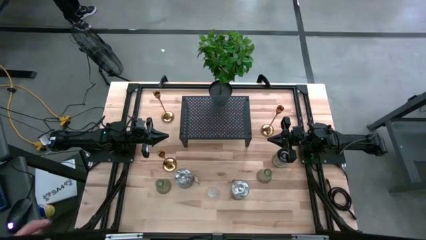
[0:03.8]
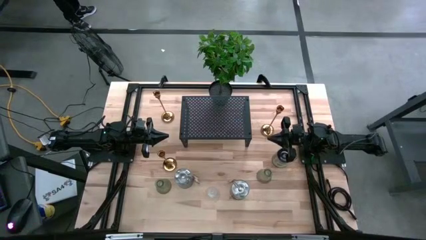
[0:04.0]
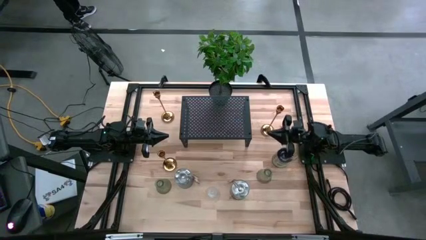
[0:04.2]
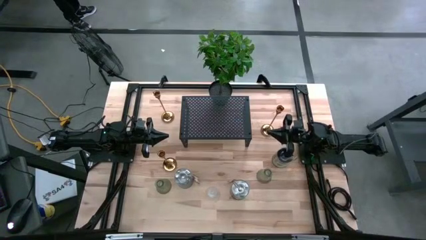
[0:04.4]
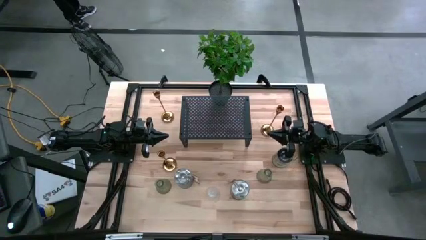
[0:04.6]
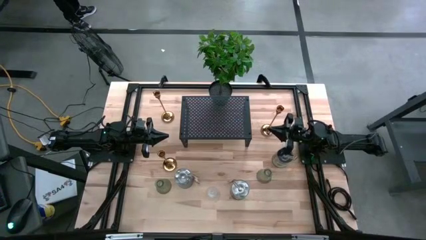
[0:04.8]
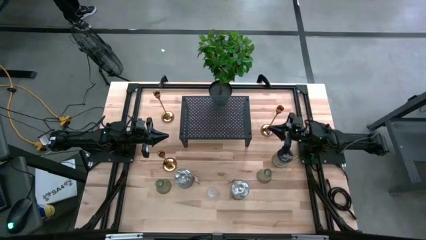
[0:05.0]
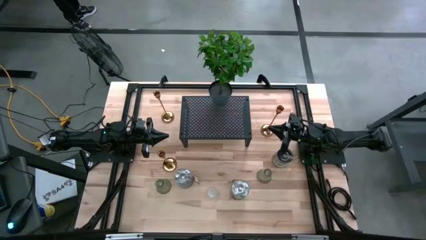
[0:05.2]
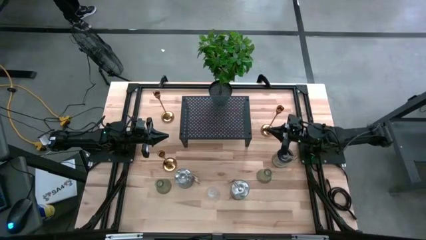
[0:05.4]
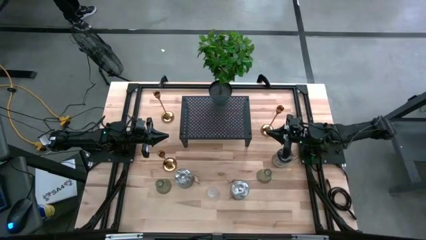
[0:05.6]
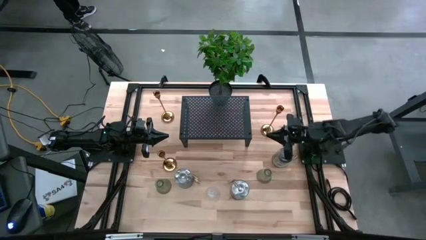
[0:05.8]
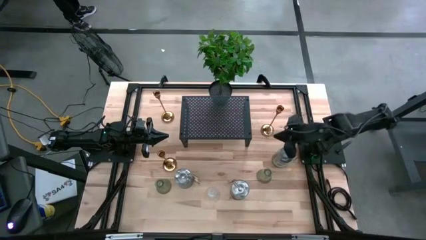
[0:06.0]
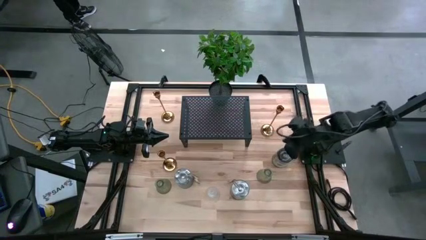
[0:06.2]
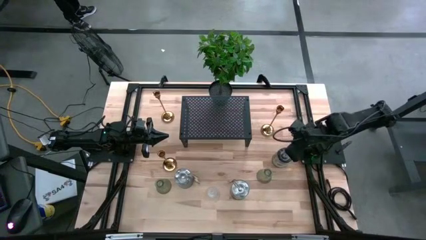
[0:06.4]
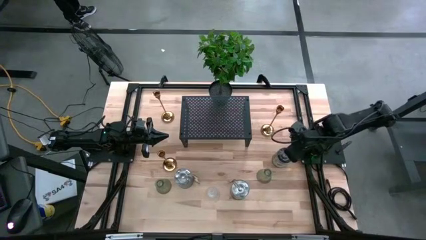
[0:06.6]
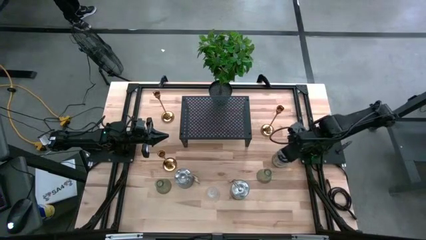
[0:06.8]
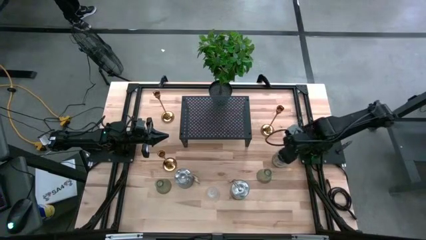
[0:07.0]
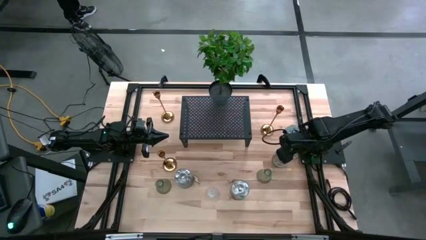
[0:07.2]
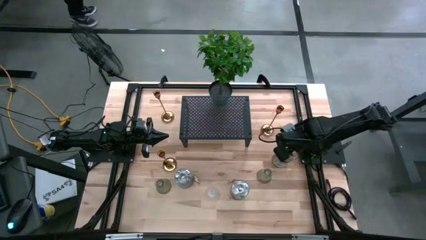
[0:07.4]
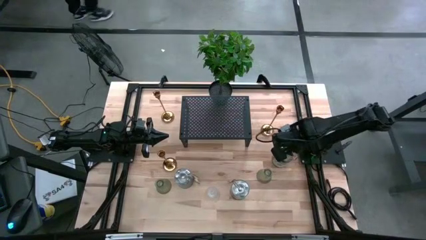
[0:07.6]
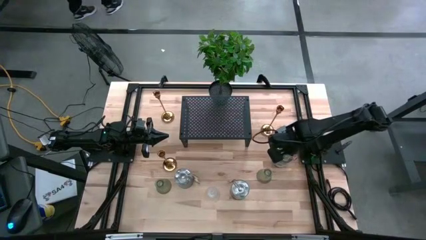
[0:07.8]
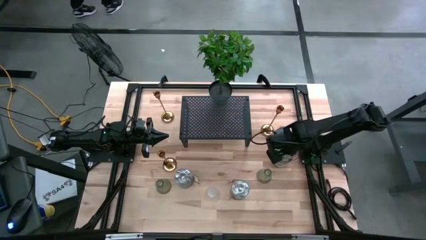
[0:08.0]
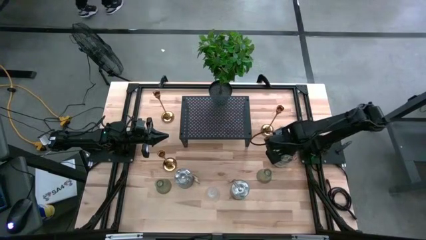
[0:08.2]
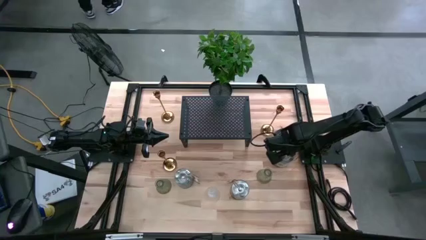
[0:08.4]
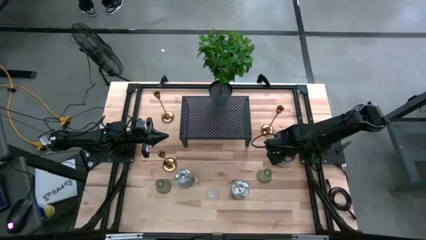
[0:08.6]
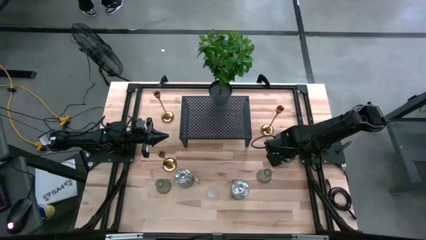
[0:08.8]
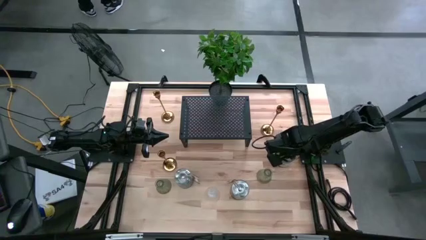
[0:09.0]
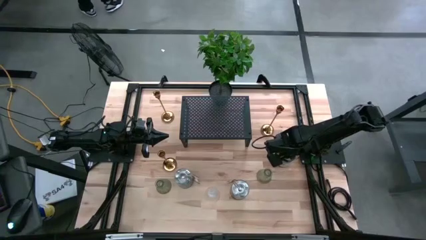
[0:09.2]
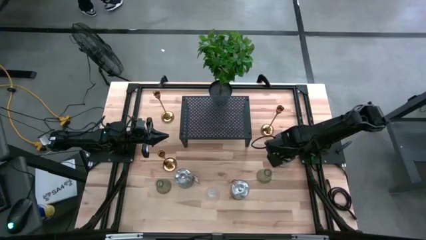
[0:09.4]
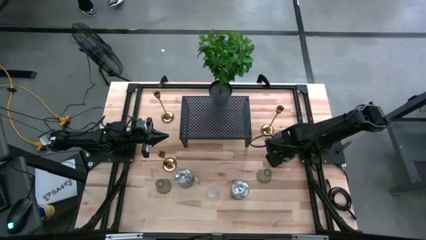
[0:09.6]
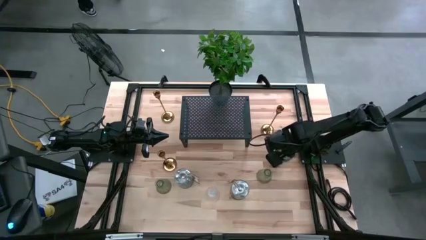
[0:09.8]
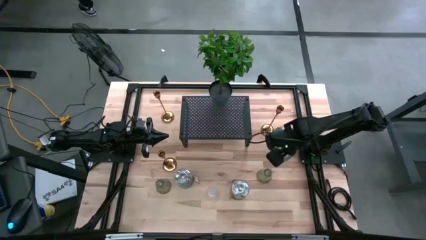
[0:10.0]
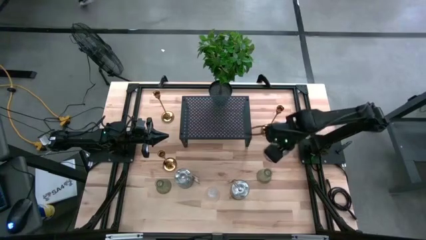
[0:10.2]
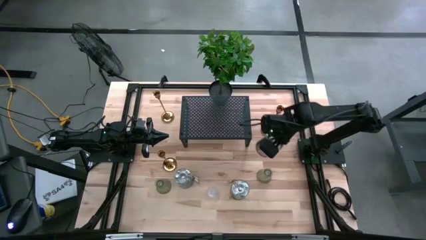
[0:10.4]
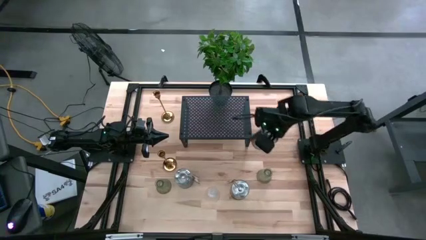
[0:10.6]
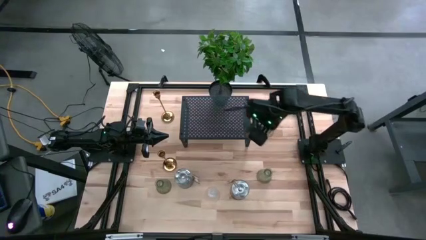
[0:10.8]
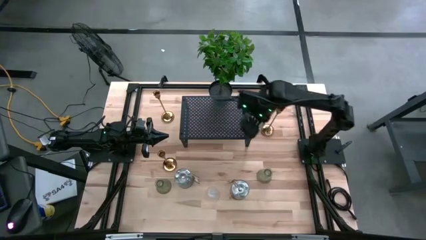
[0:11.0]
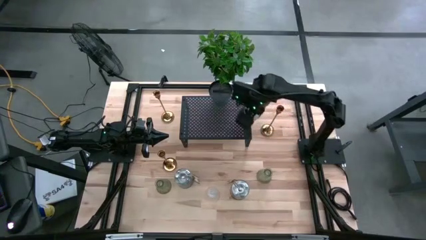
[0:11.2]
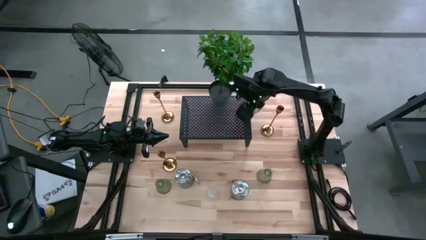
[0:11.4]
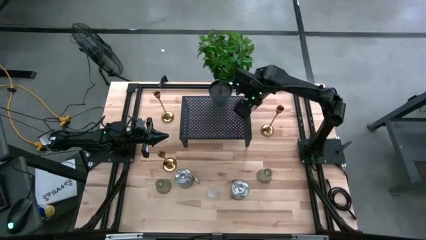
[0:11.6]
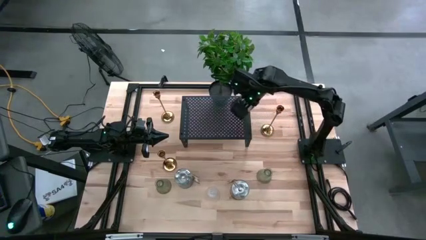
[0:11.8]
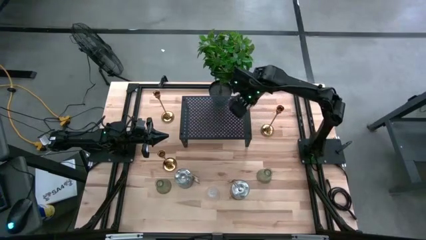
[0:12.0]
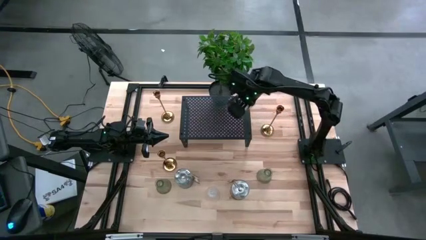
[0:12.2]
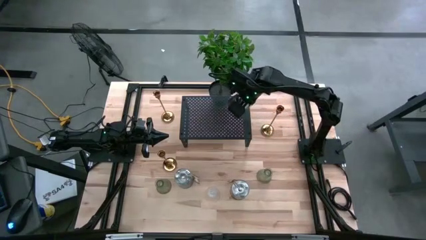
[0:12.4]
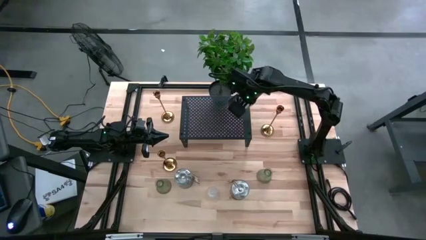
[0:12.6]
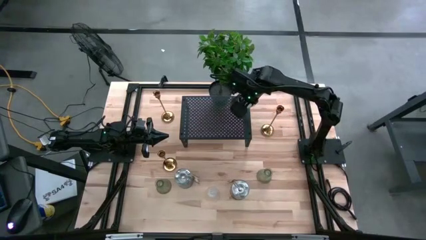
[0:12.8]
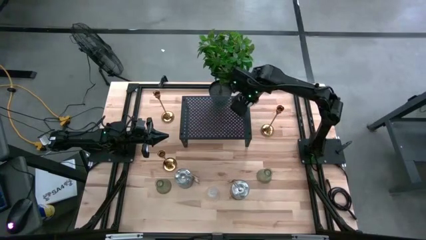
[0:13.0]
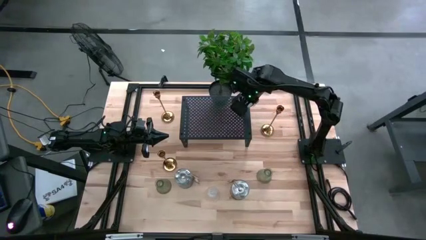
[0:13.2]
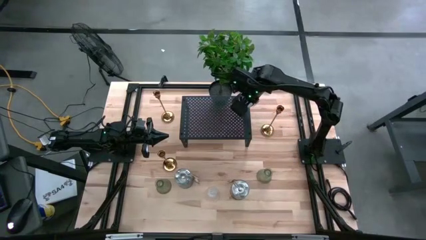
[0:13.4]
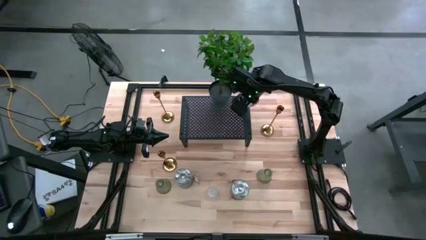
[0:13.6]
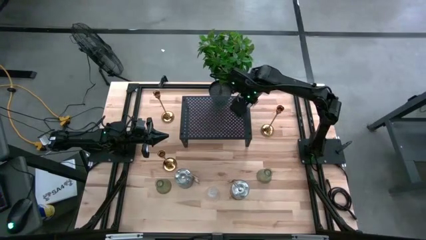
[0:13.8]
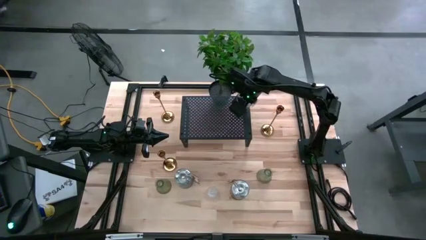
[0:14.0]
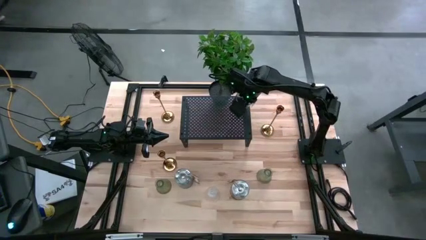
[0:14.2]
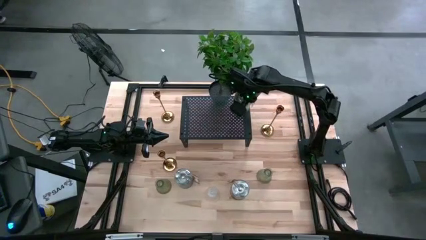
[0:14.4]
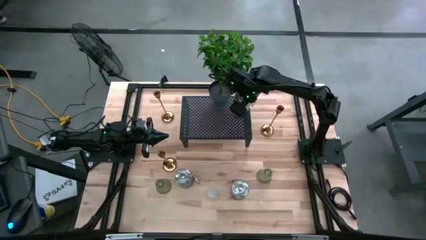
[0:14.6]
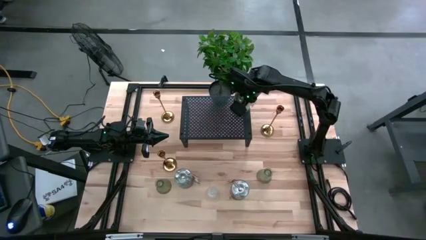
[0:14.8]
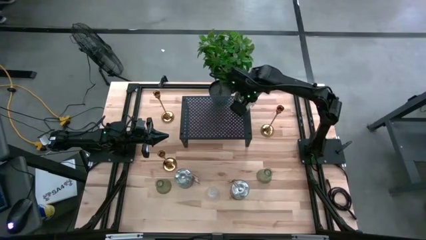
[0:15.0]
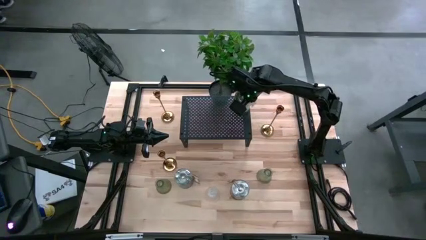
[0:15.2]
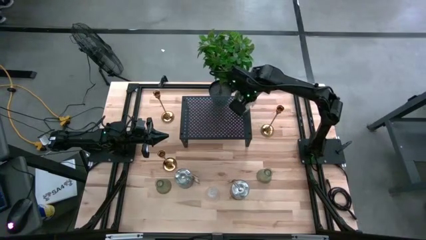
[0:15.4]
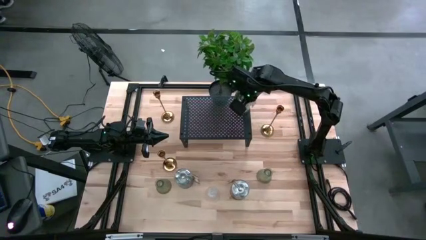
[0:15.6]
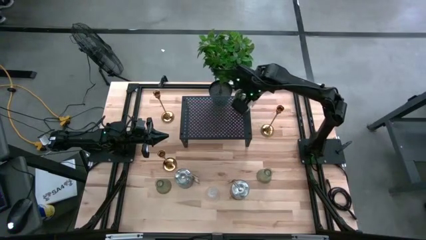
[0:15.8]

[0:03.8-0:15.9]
Task: Pick & Place candle stick holders
Put the top silver scented candle on the shelf
